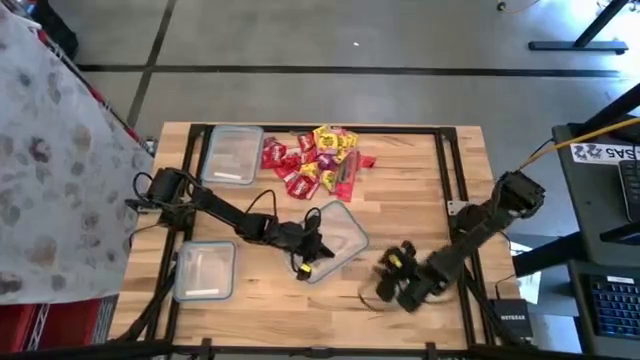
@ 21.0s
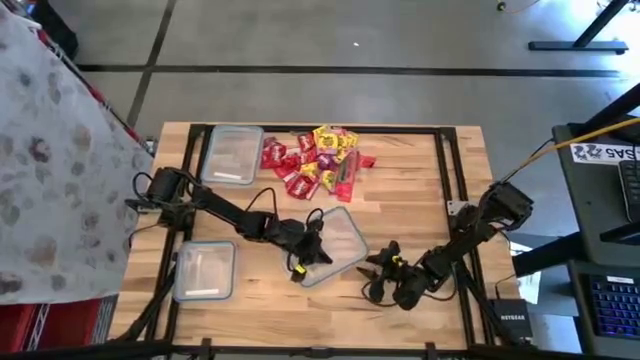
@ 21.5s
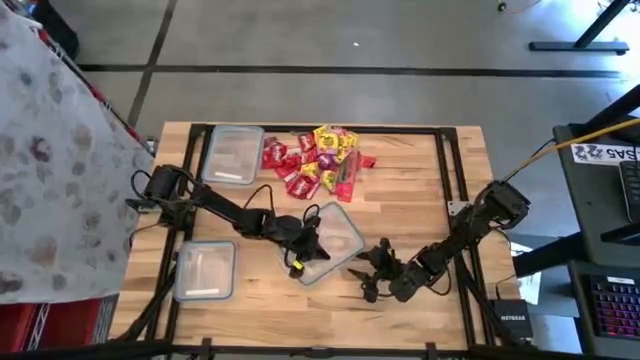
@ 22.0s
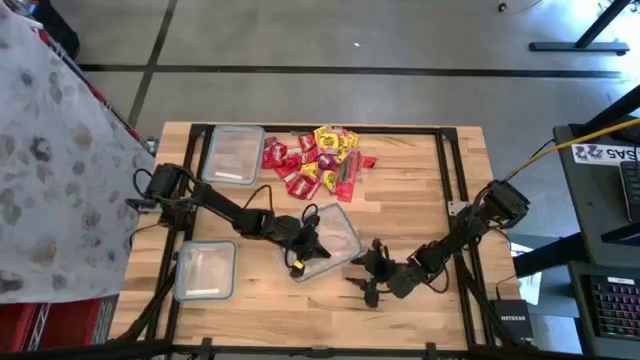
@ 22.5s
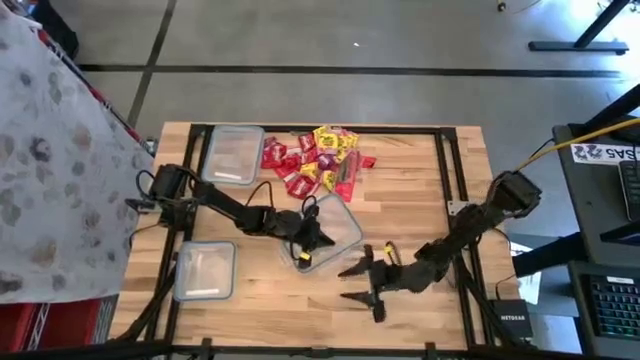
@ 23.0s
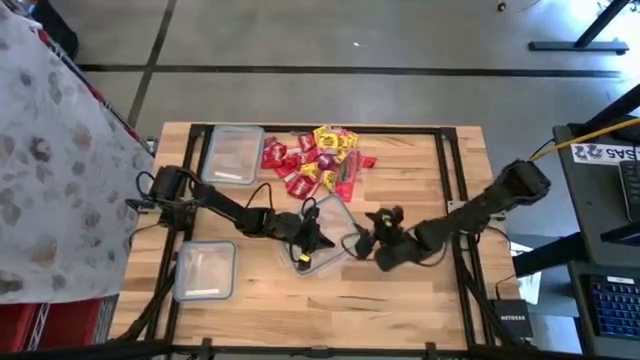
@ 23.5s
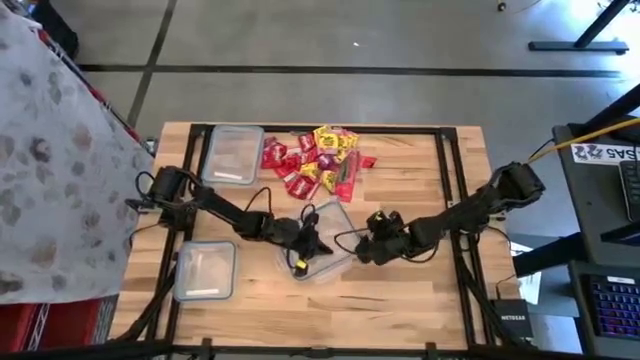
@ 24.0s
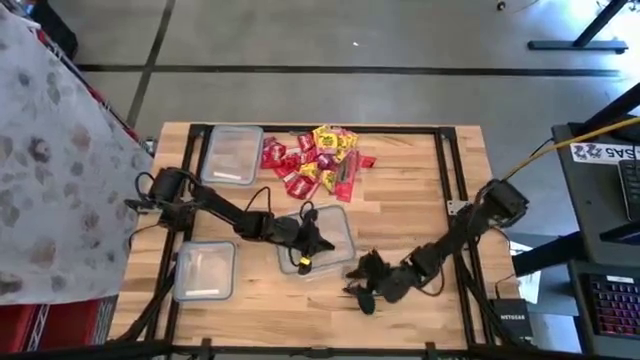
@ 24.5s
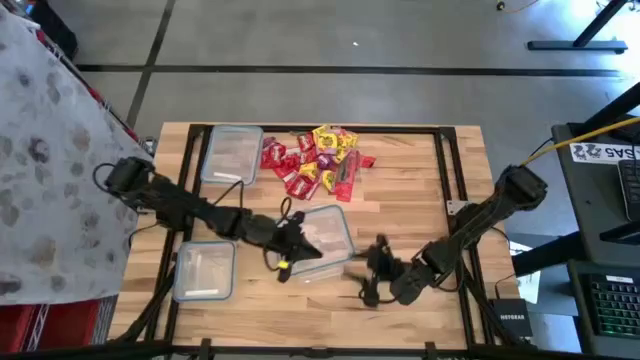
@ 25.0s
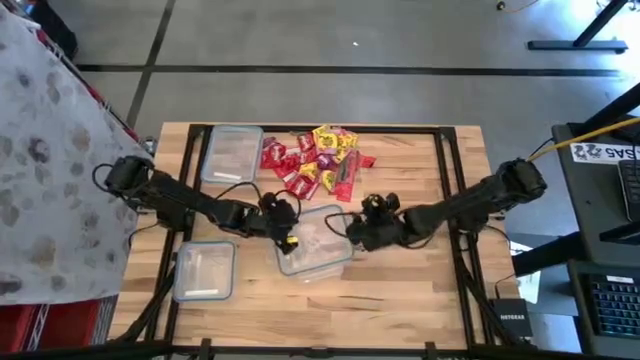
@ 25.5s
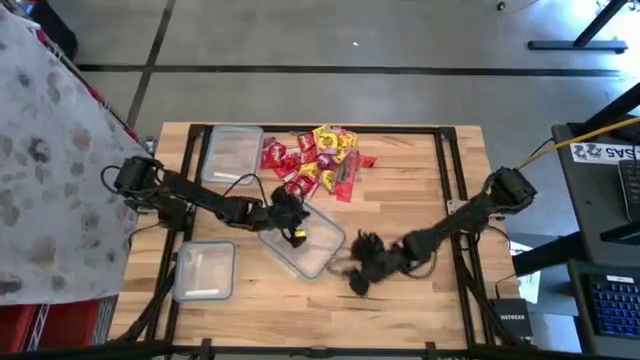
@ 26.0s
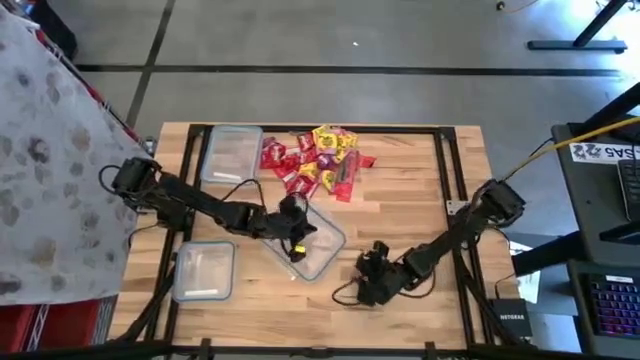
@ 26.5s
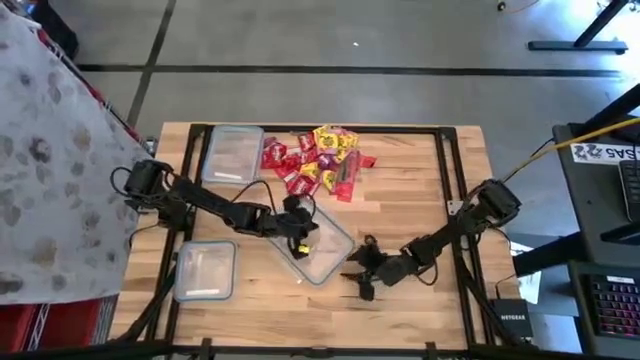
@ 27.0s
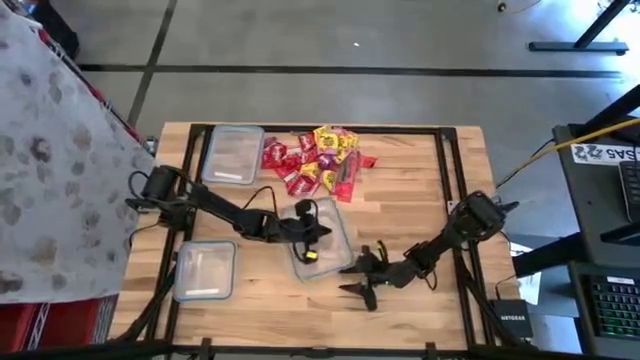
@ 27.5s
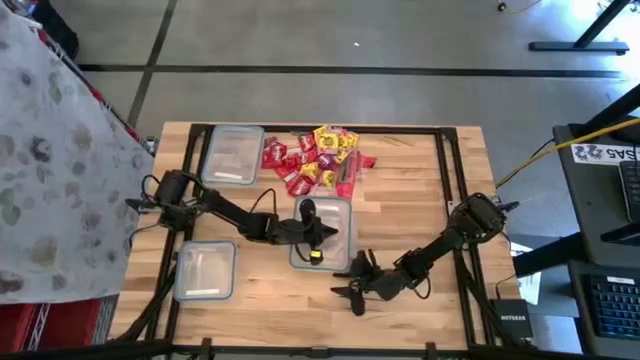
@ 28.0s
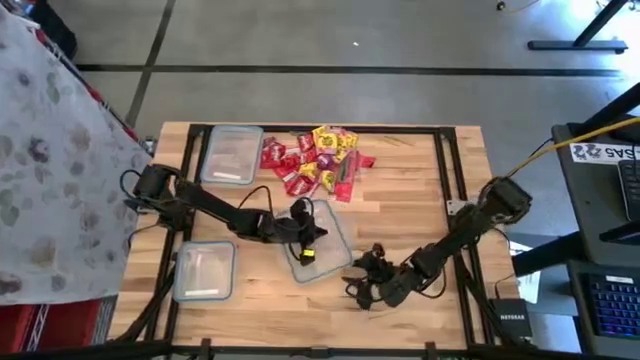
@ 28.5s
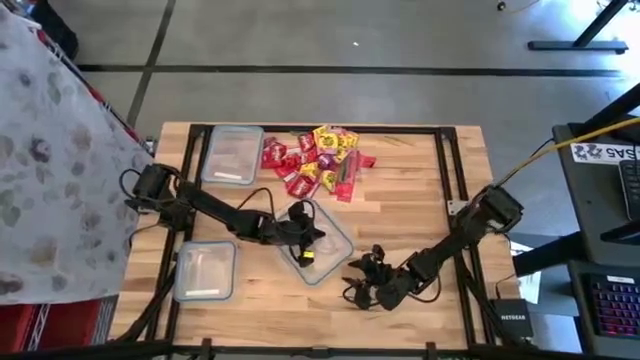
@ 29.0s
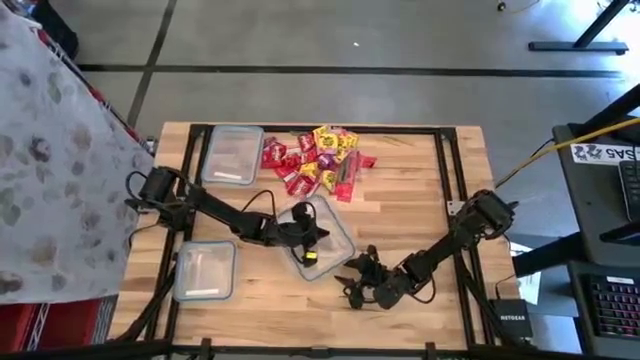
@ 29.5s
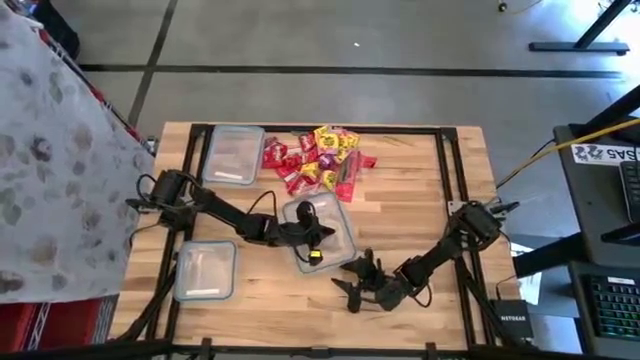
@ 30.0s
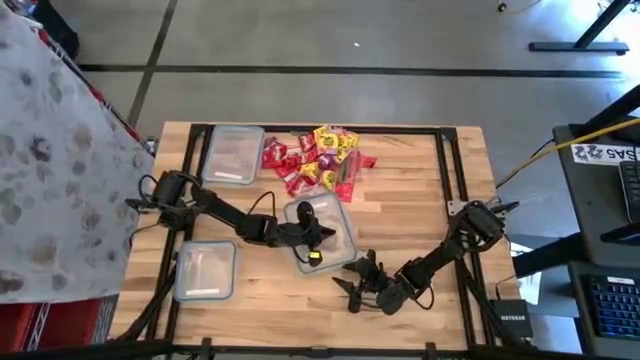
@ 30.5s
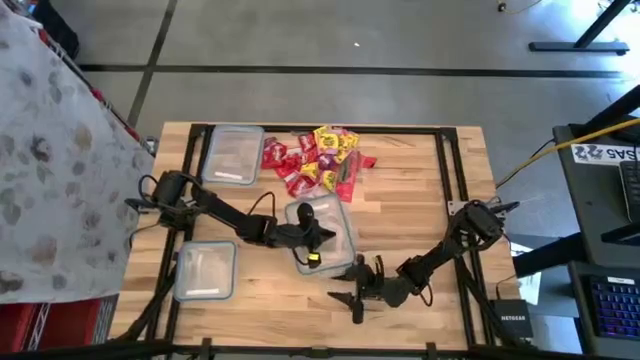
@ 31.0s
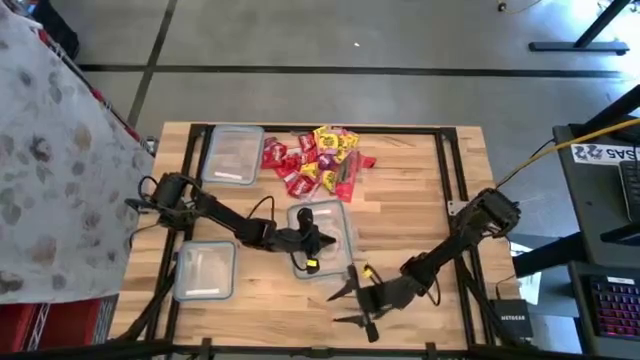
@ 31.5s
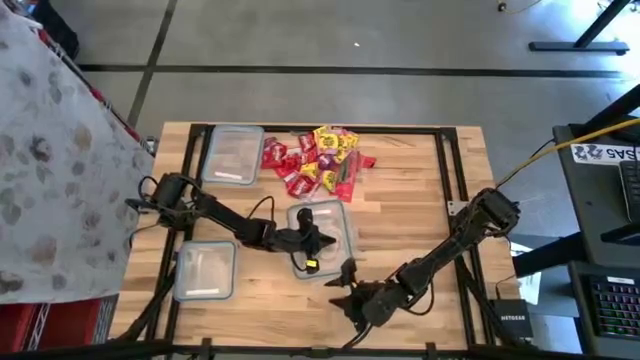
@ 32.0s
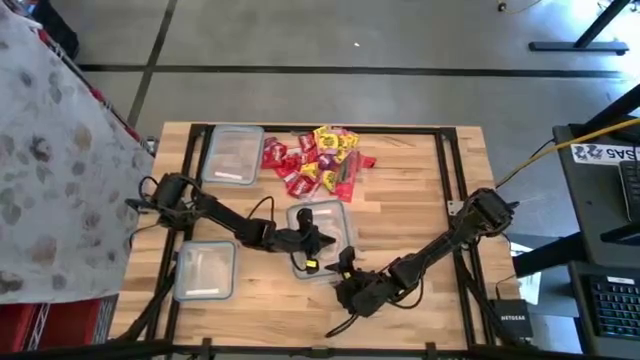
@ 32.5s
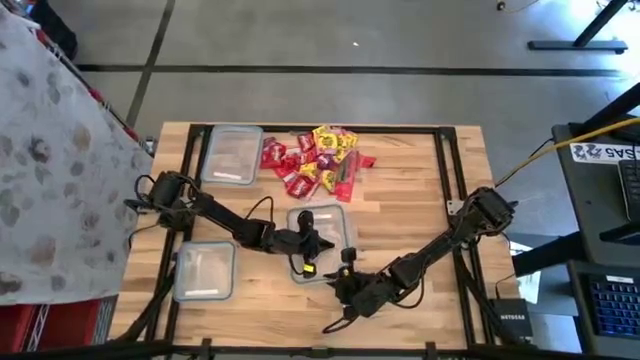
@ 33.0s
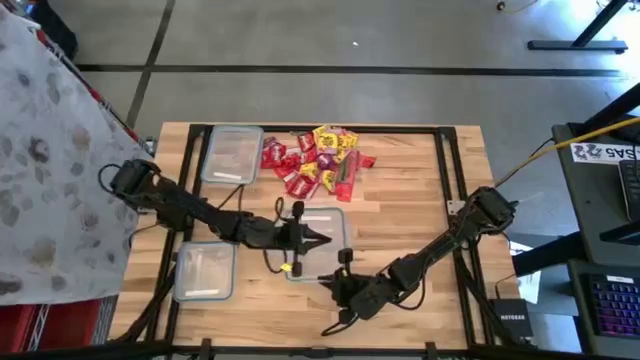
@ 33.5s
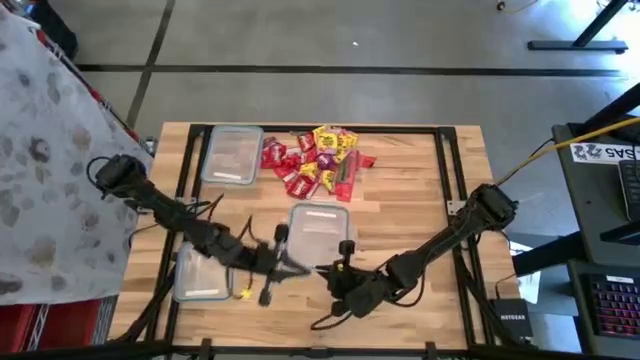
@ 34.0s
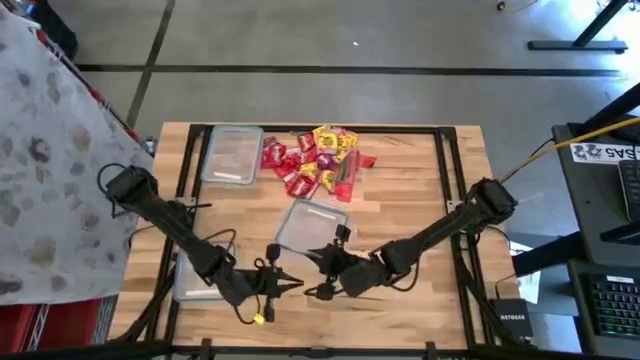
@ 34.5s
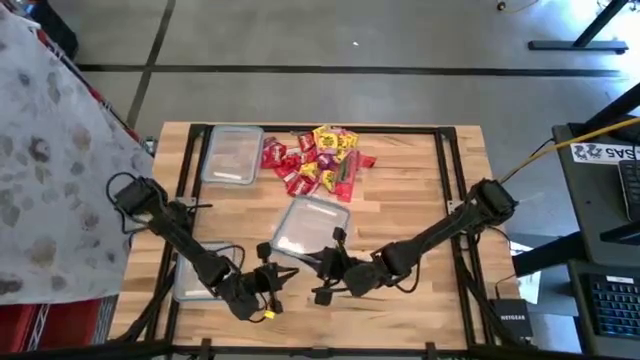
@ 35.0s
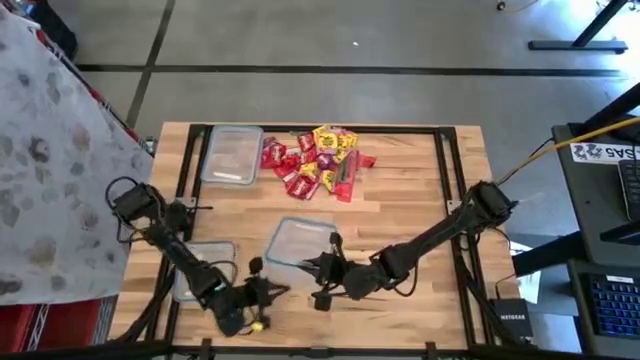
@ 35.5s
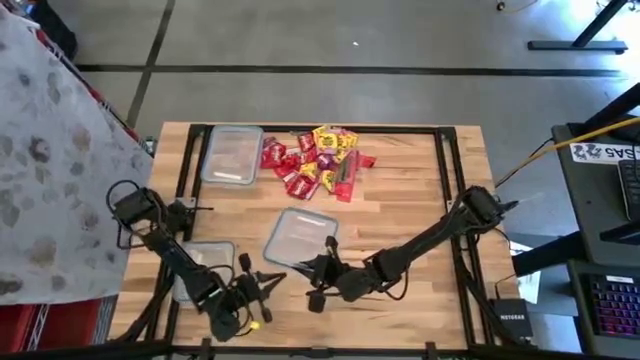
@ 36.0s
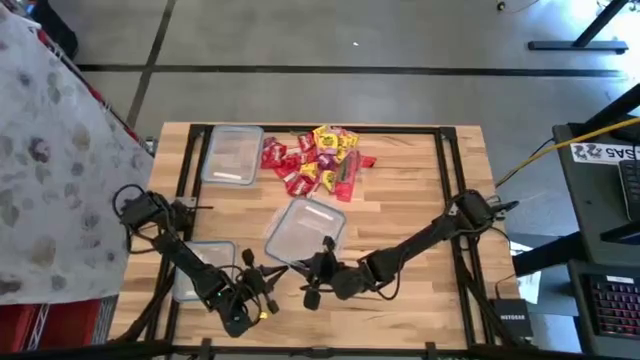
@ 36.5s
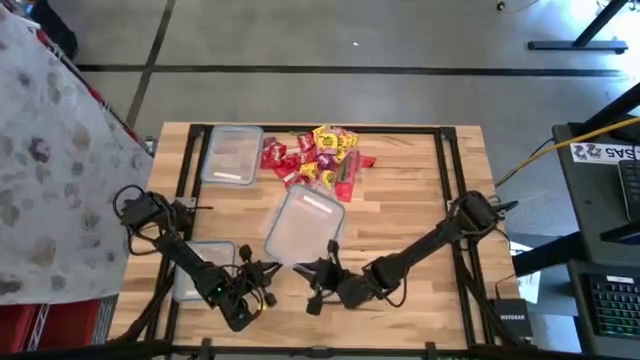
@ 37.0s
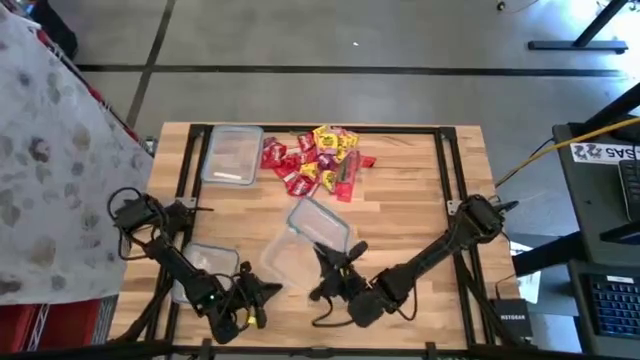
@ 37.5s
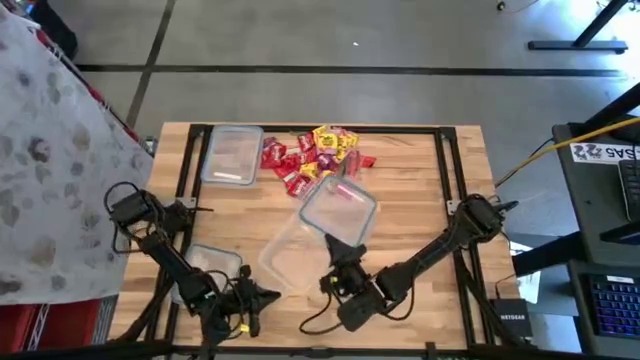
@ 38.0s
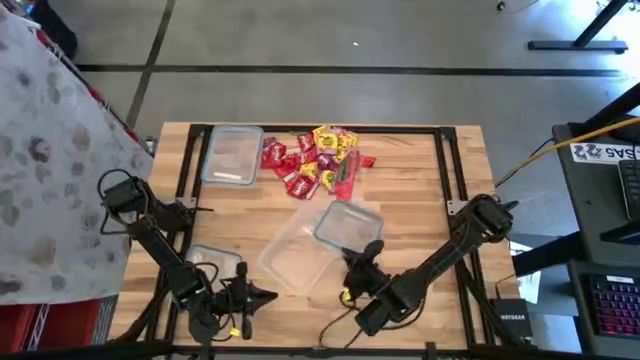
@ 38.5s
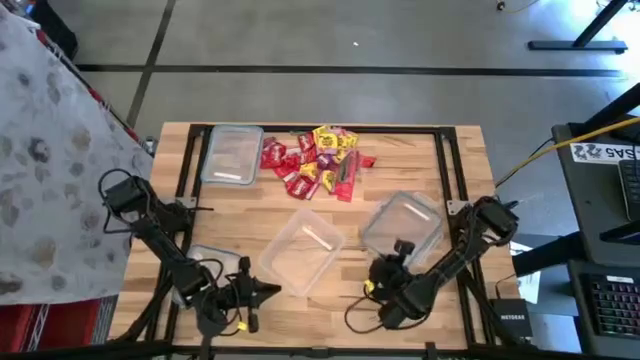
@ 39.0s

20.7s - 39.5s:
Task: Sort candy
Open the right transparent bin
